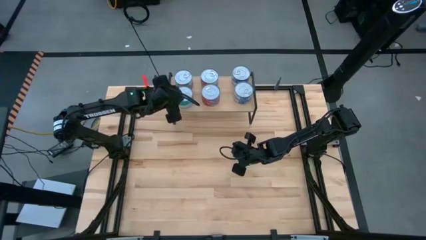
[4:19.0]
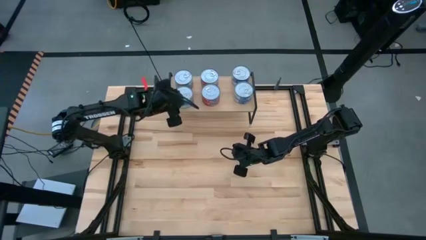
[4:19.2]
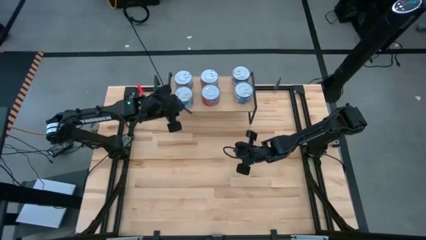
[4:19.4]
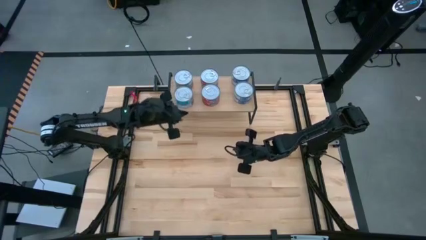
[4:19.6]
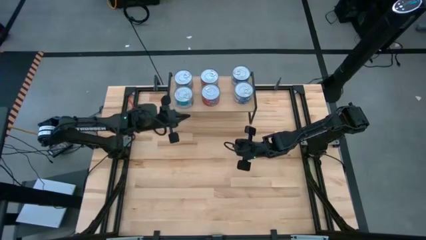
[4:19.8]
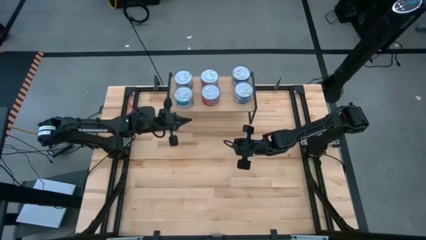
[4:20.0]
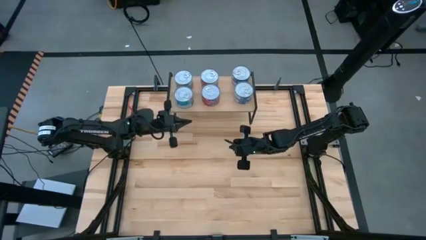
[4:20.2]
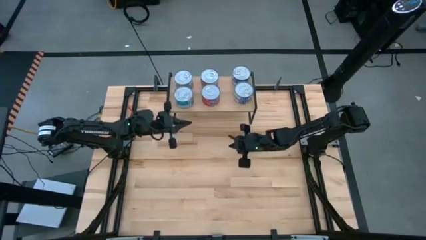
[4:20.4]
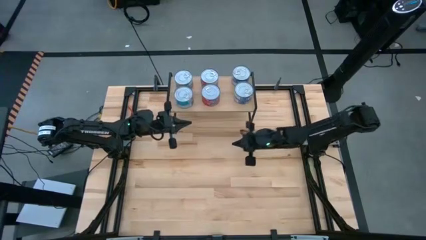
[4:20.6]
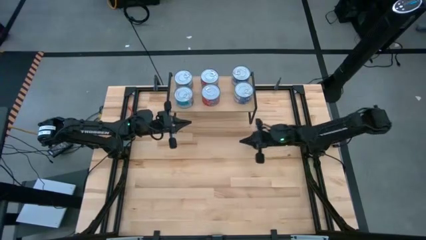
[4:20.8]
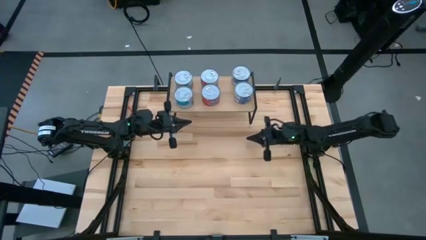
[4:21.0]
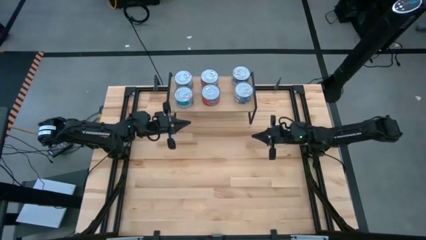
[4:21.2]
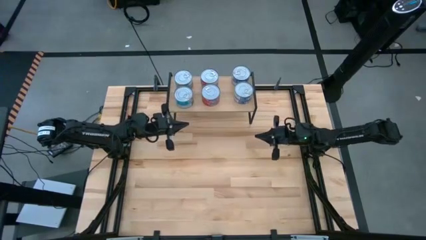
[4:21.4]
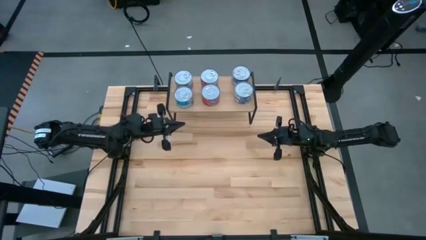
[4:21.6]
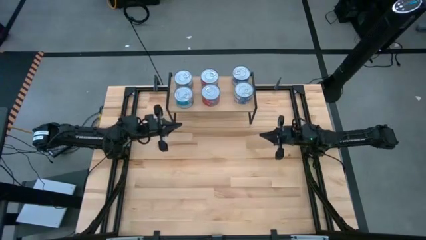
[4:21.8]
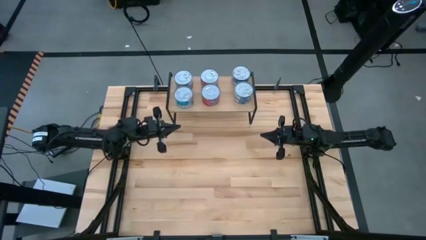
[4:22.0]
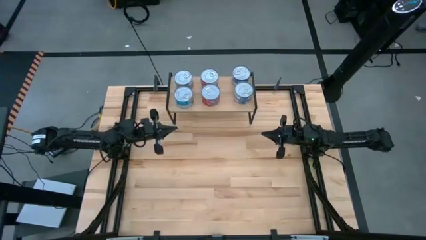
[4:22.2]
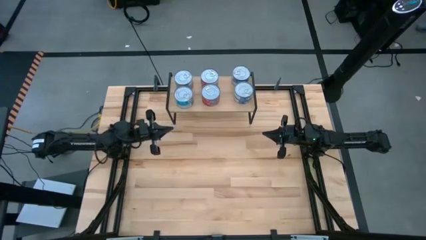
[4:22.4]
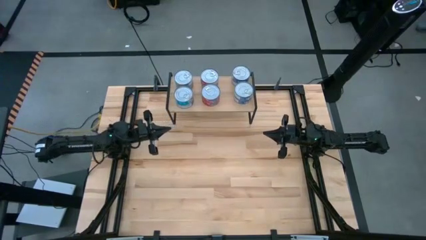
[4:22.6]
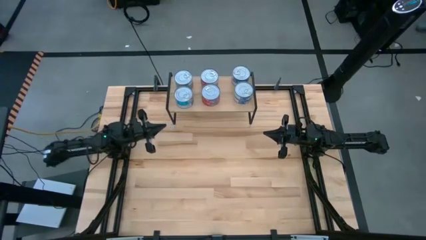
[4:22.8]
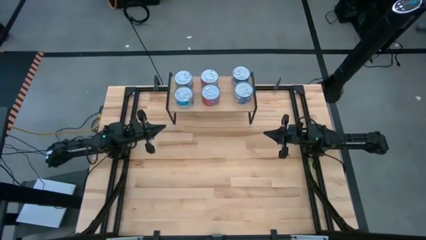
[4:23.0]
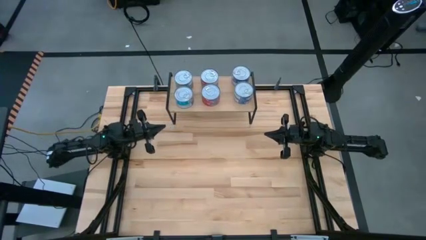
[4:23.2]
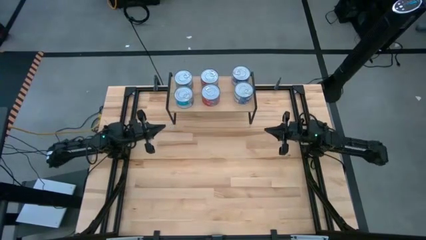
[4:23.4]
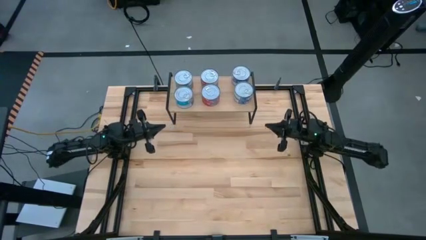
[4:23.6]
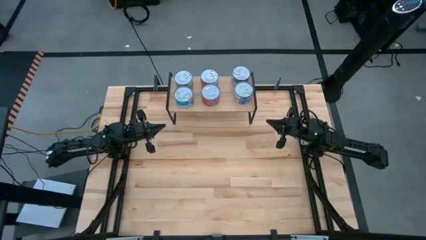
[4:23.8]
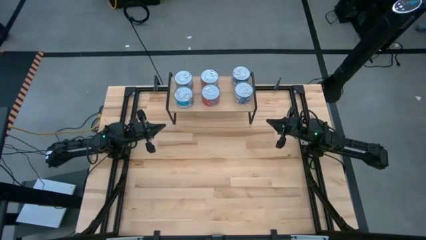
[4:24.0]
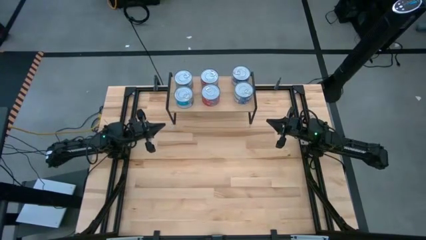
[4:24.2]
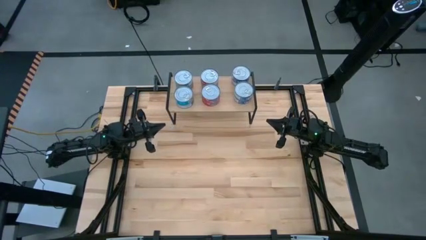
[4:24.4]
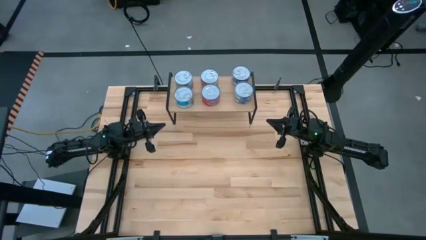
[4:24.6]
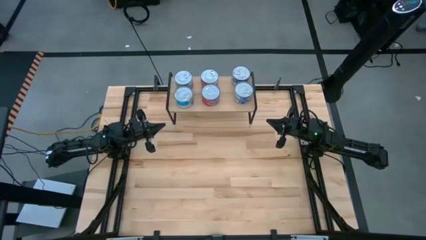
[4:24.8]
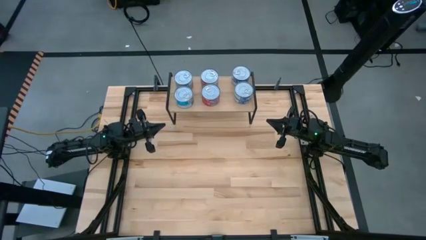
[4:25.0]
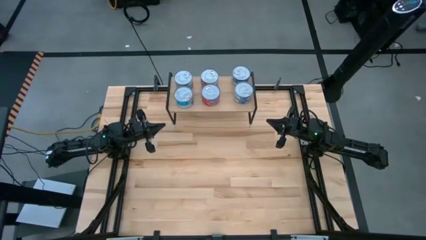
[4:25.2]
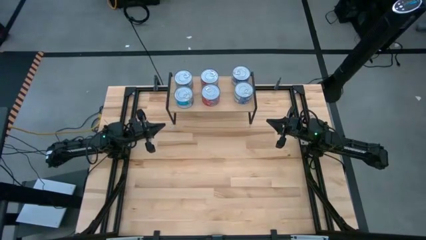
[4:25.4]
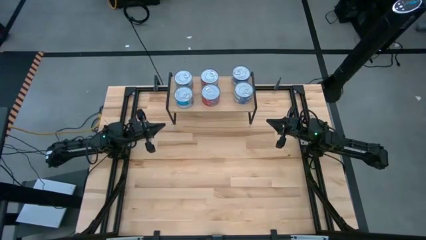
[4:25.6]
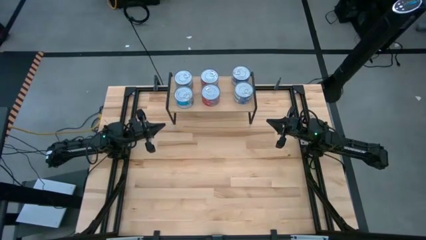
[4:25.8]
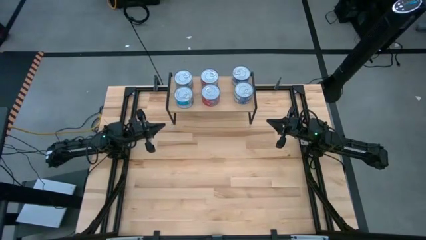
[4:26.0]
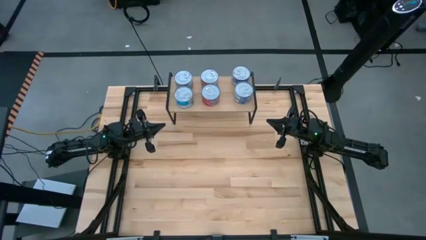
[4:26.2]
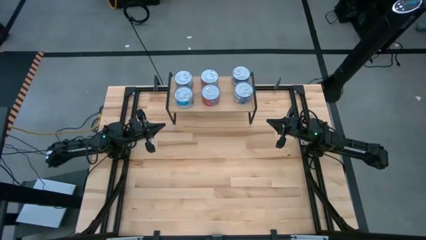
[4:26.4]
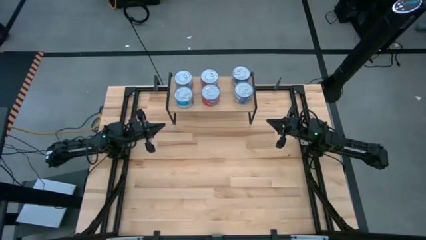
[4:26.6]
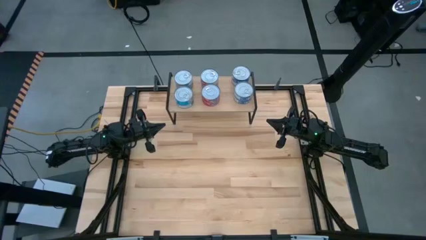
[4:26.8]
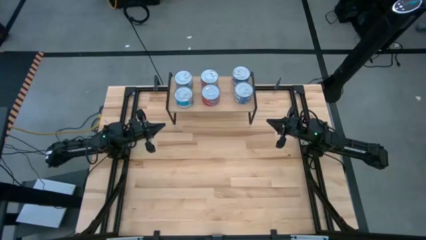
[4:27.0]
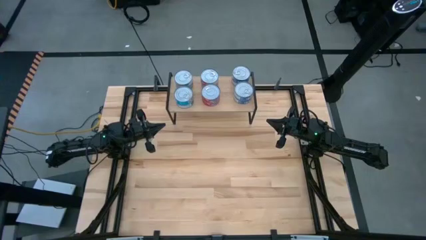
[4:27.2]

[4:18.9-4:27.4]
Task: Stack canned seafood by type on shelf
Return to Home Position

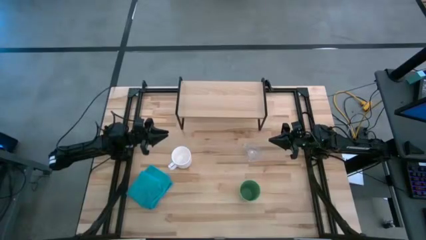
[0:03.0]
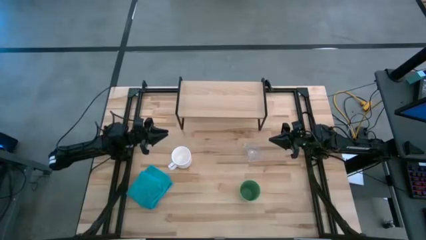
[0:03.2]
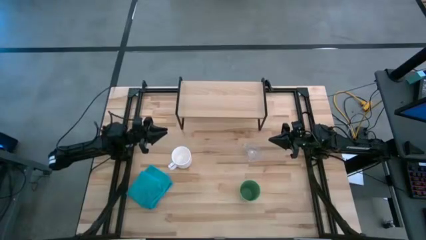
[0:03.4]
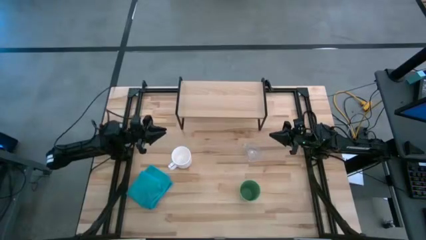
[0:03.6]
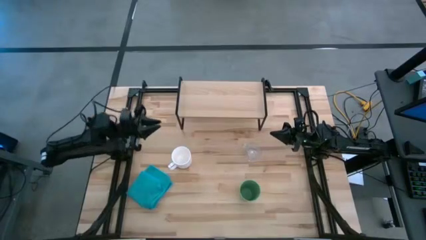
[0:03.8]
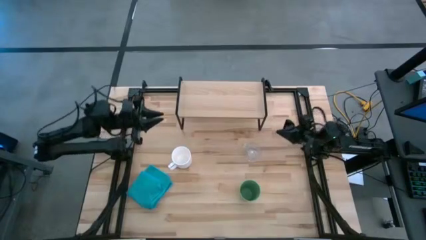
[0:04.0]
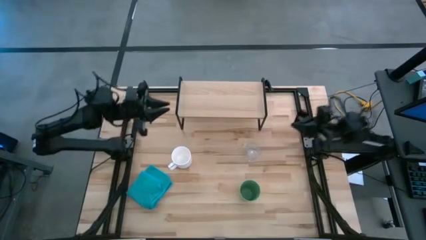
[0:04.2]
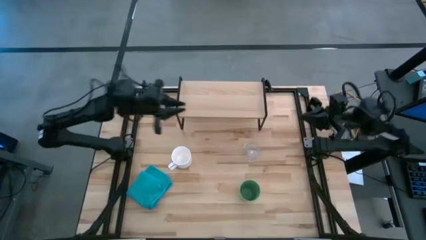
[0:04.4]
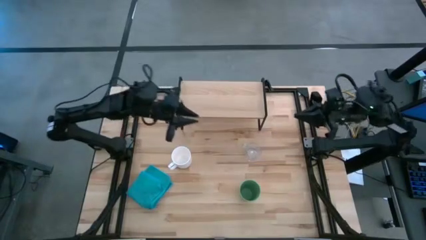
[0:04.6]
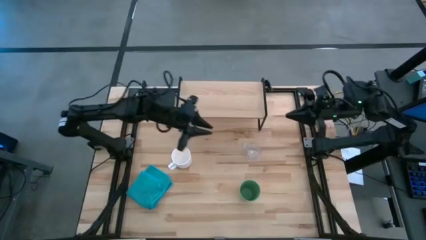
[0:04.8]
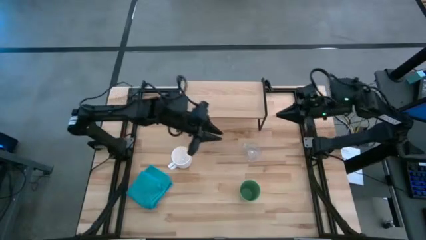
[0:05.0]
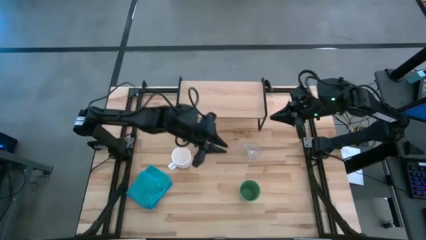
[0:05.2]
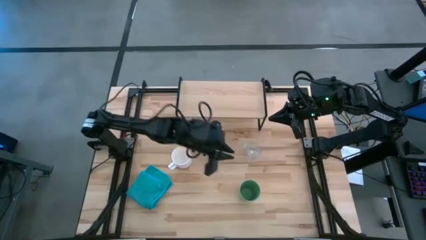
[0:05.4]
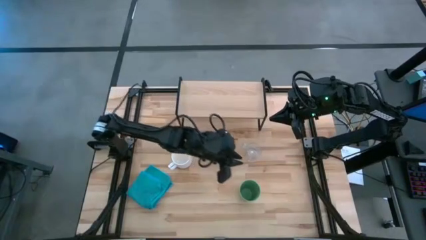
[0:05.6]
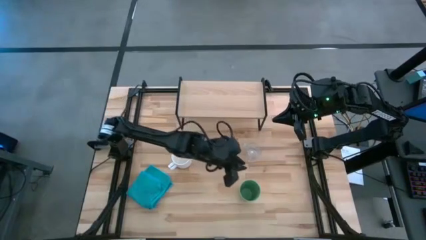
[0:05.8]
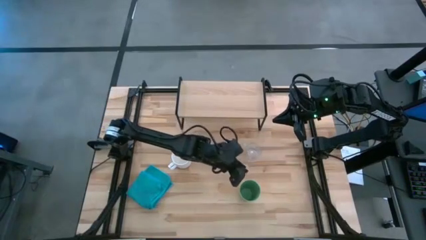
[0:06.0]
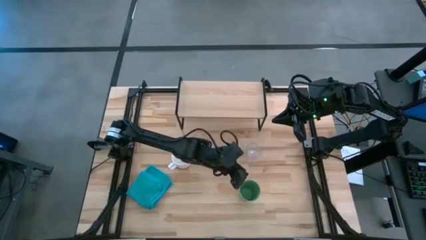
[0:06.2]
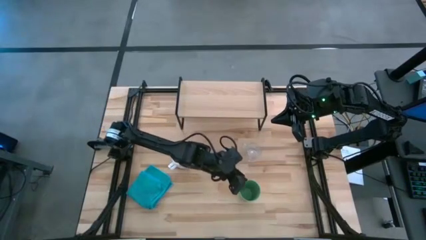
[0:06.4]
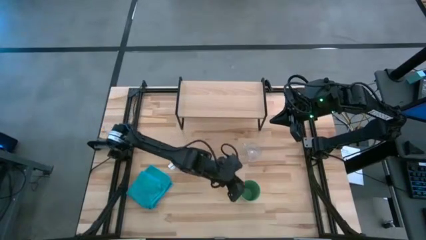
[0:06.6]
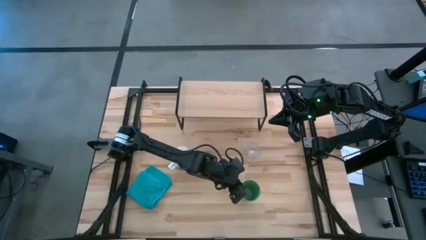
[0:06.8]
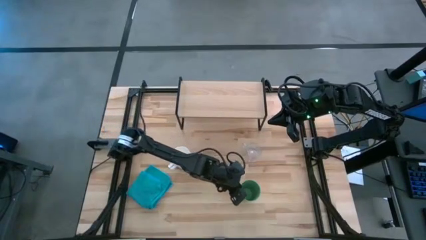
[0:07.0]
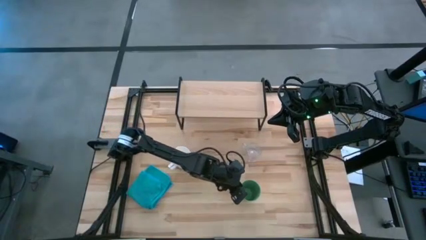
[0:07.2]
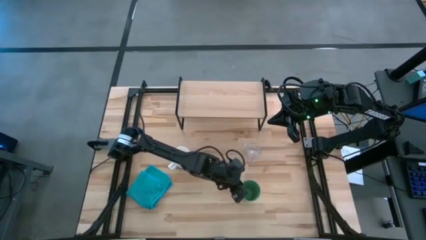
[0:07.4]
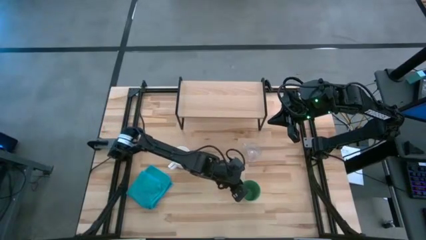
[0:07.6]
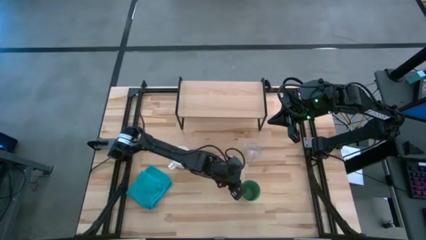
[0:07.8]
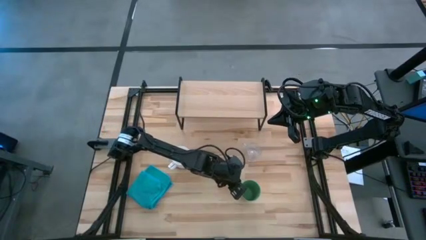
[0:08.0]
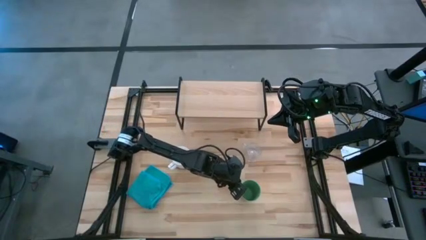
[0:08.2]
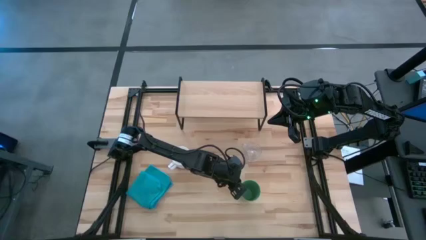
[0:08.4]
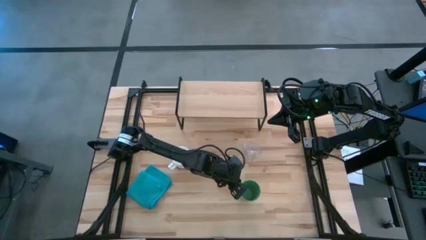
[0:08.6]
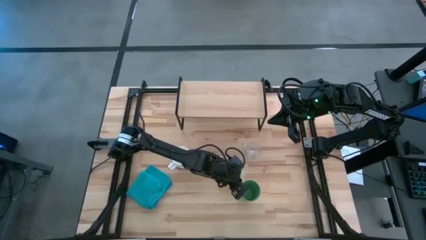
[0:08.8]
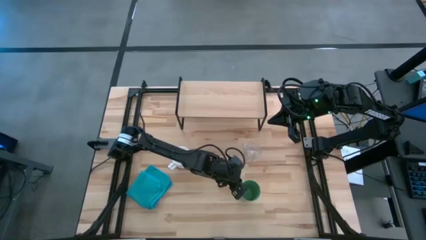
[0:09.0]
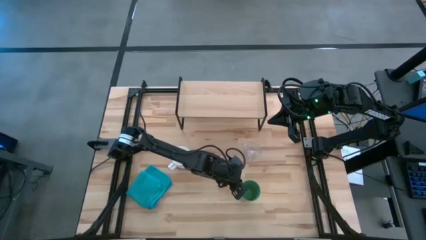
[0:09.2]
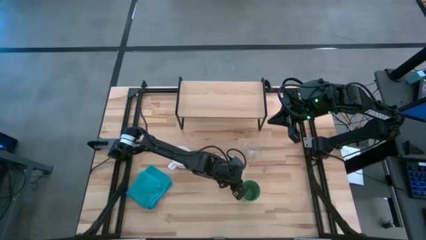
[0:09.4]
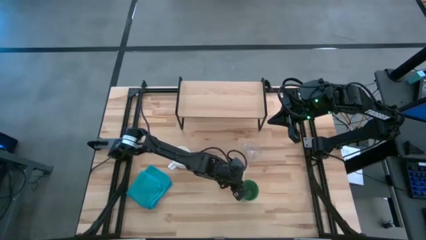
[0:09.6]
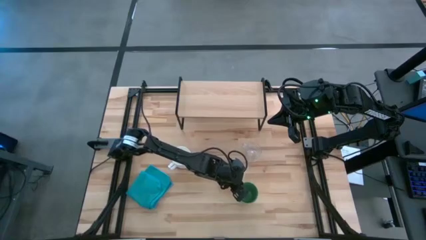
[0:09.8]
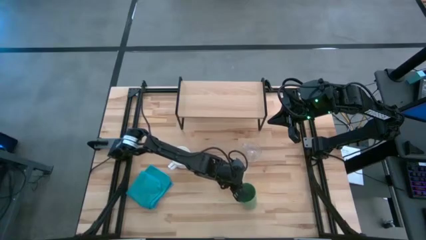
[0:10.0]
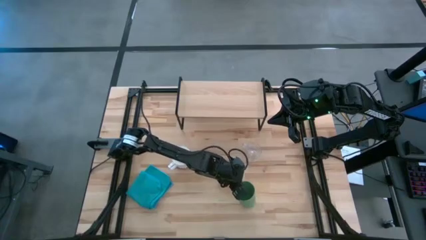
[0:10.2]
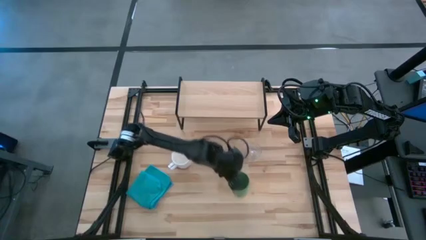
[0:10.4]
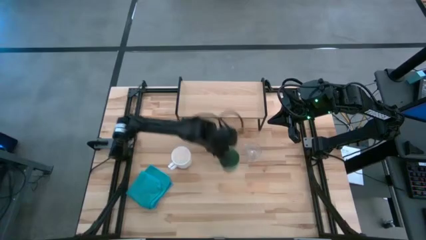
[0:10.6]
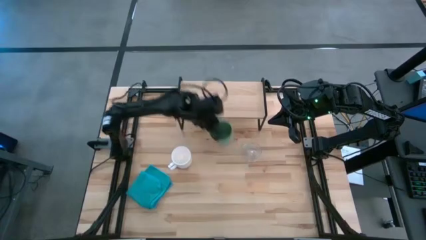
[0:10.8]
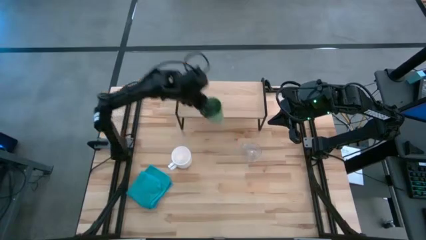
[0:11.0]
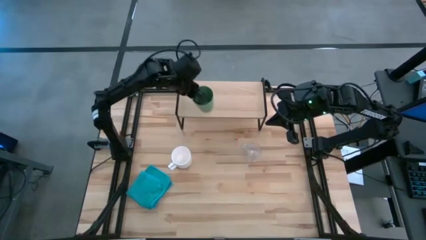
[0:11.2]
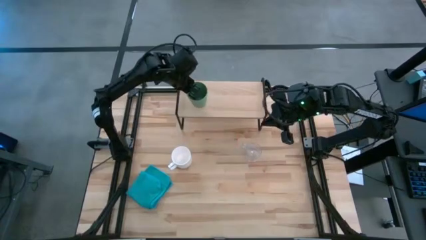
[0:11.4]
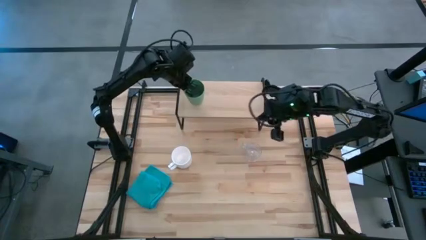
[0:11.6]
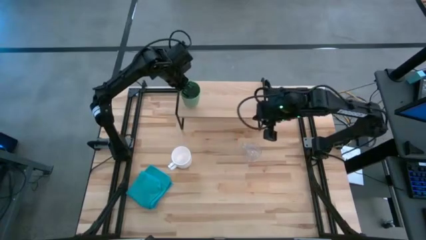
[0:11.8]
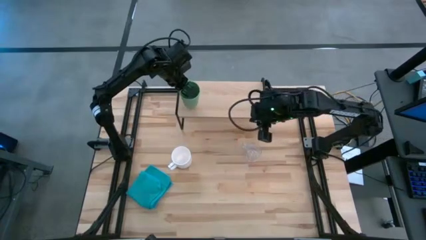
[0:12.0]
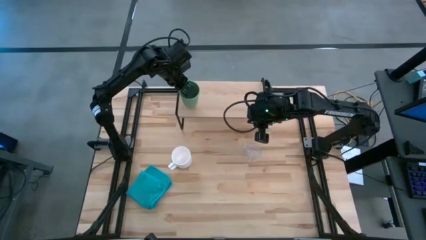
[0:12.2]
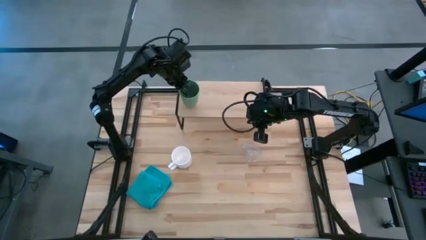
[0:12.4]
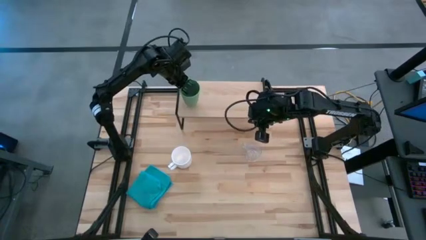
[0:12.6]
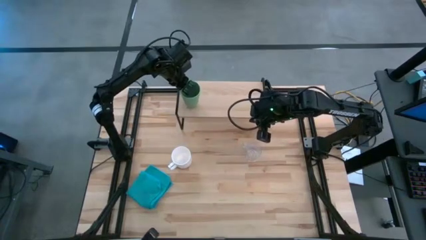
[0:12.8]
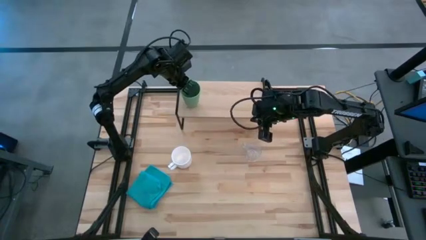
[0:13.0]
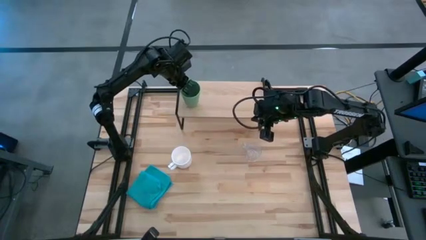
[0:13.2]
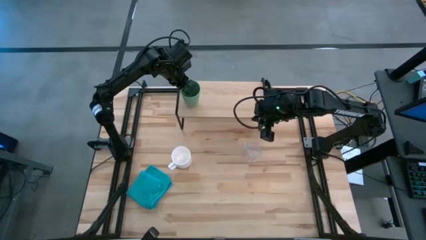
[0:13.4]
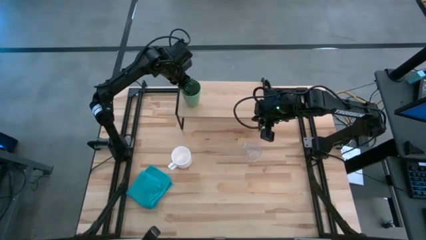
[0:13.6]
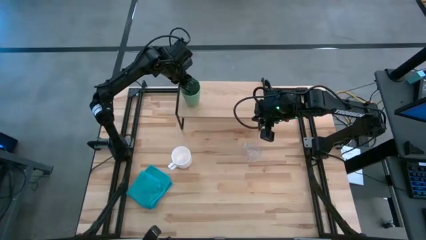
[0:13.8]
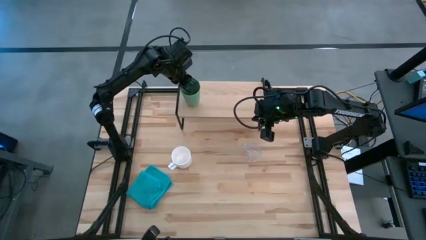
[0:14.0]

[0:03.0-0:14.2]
Task: Stack small to large cups/mugs on shelf
Put the green cup on the shelf
